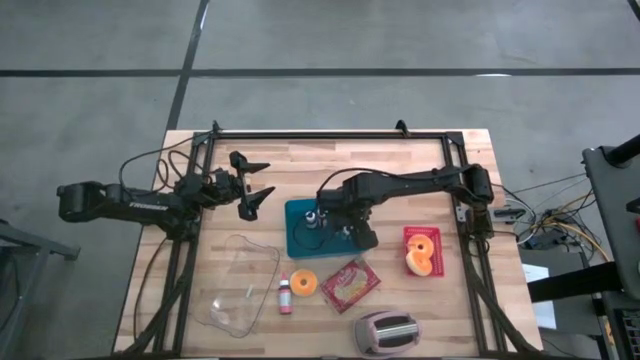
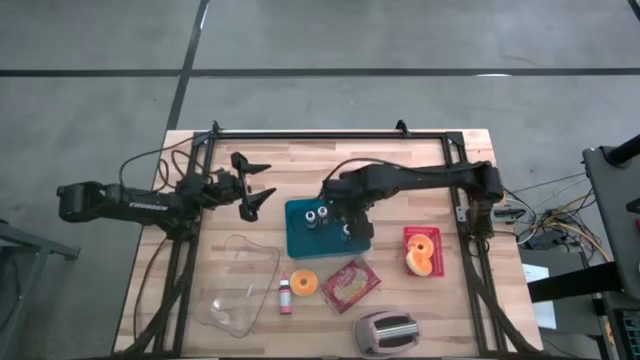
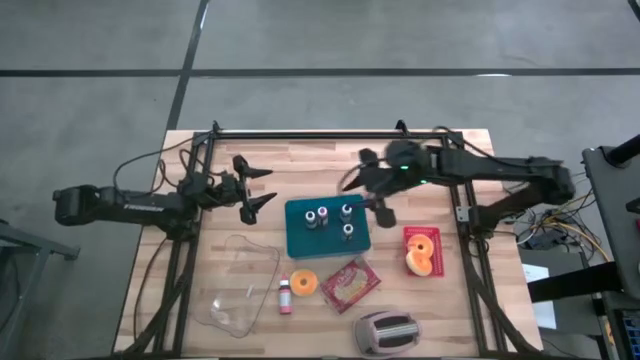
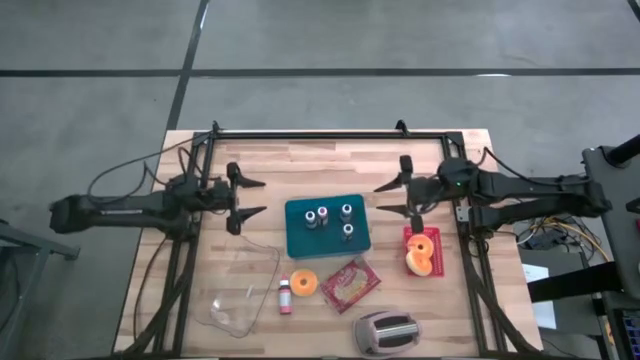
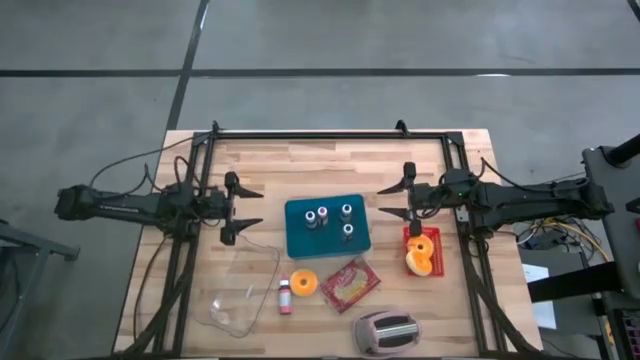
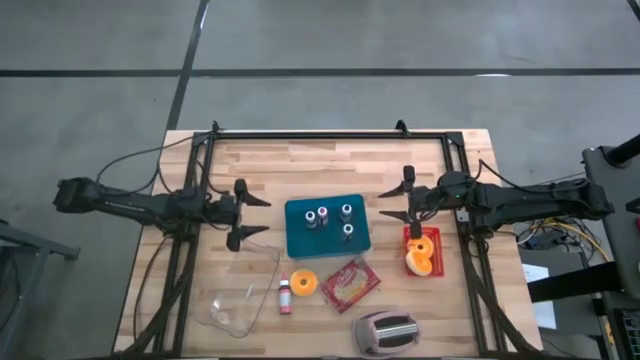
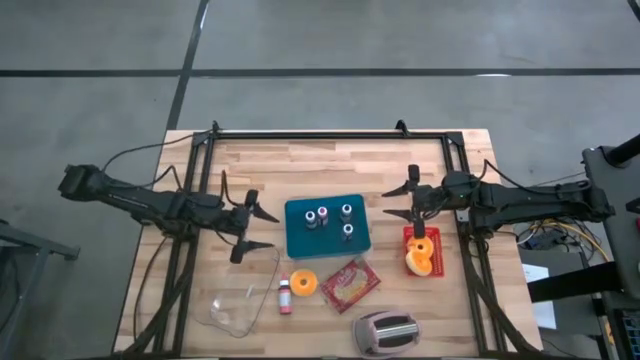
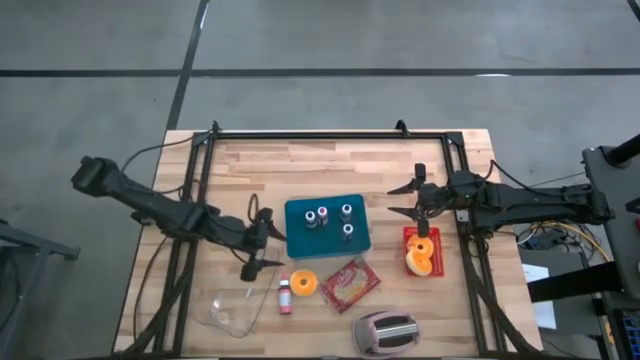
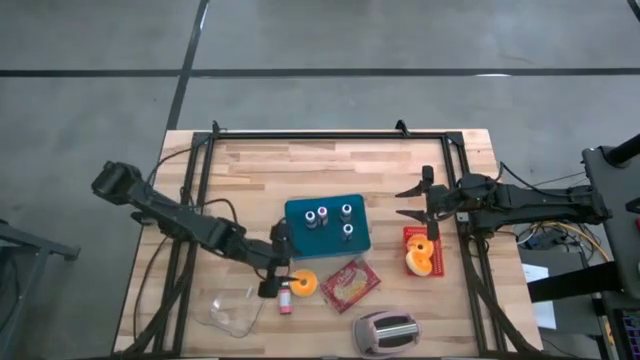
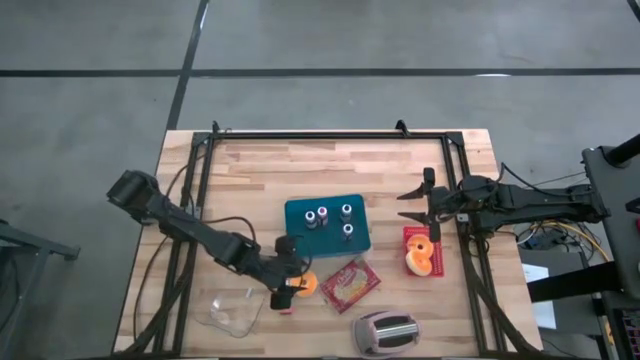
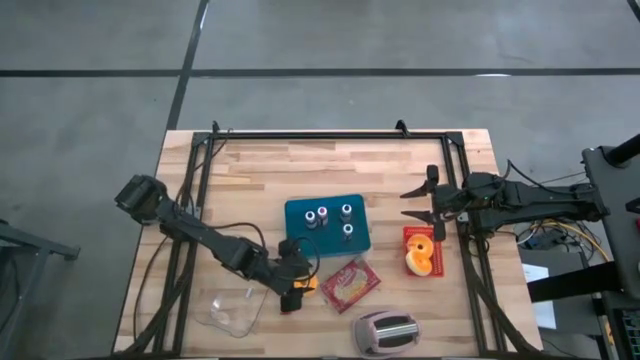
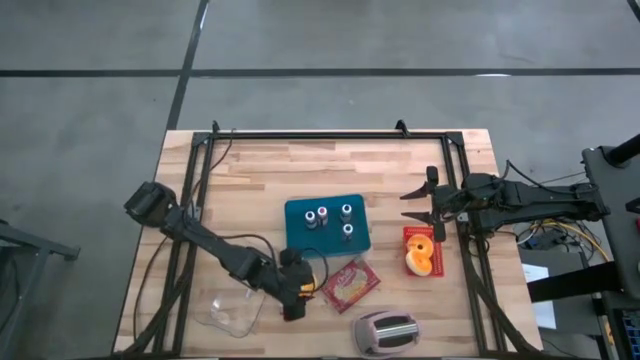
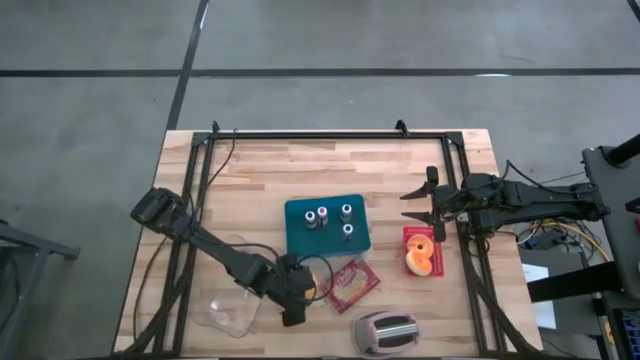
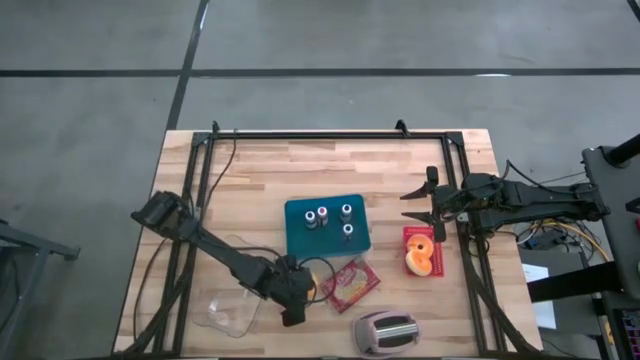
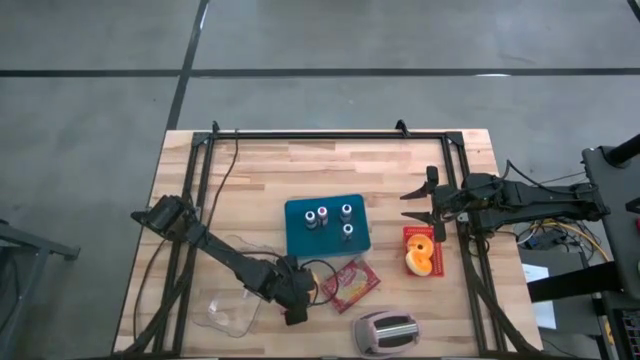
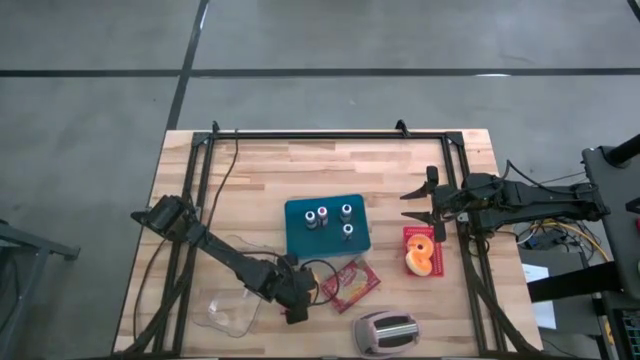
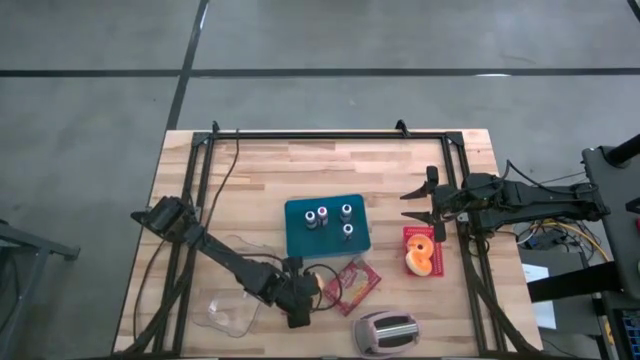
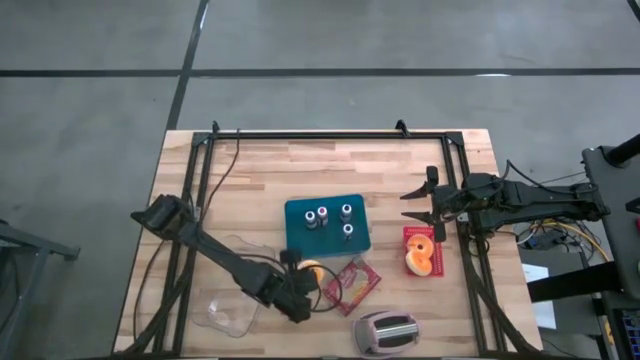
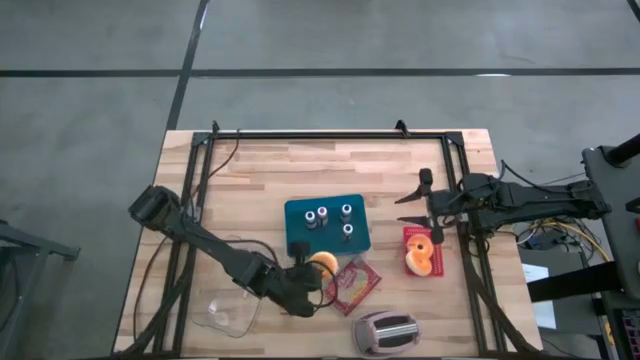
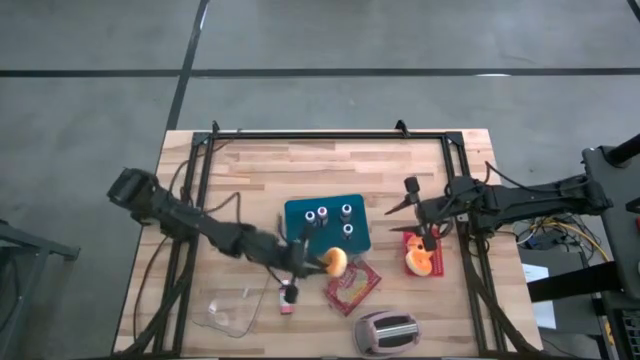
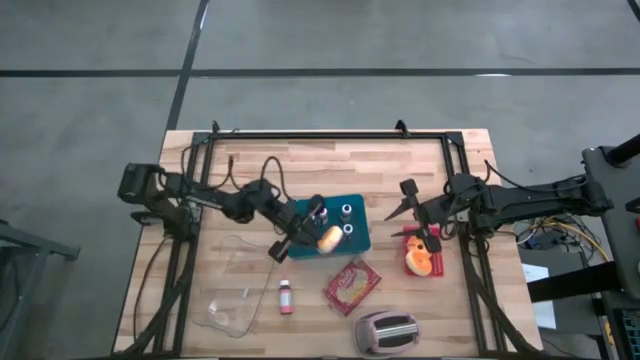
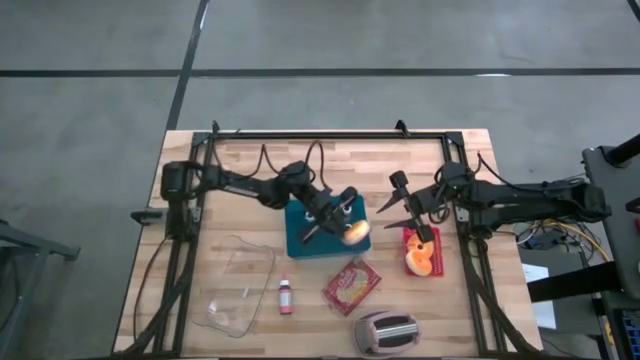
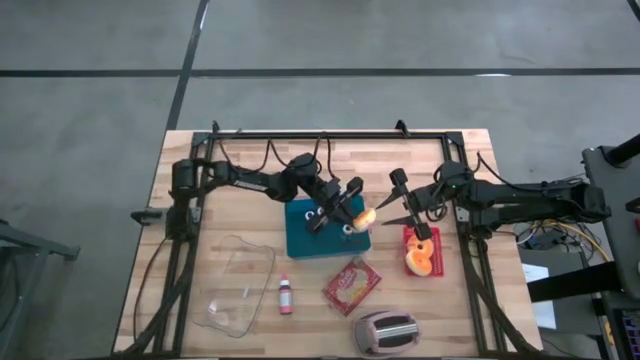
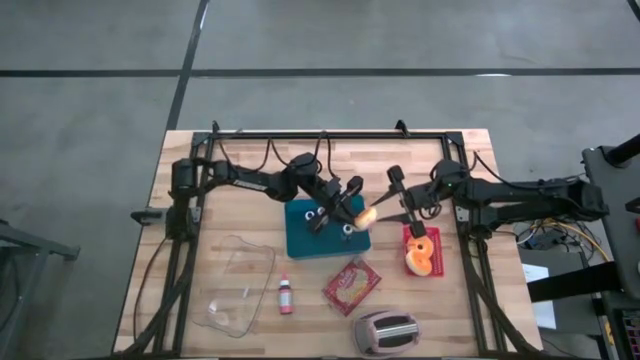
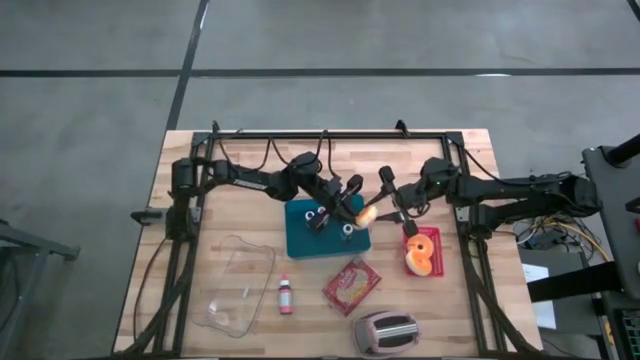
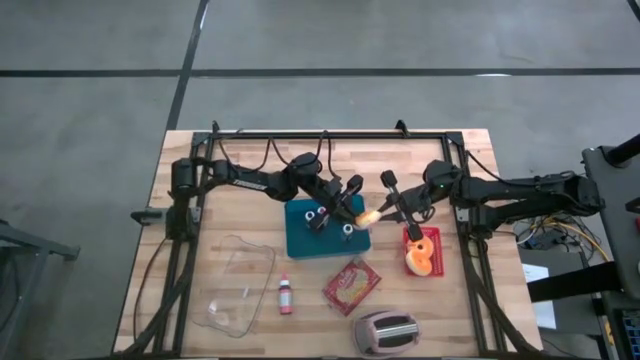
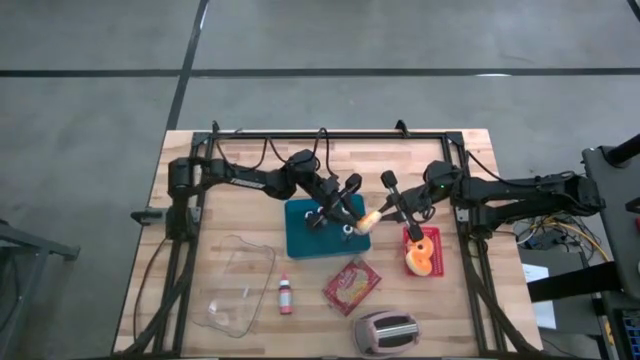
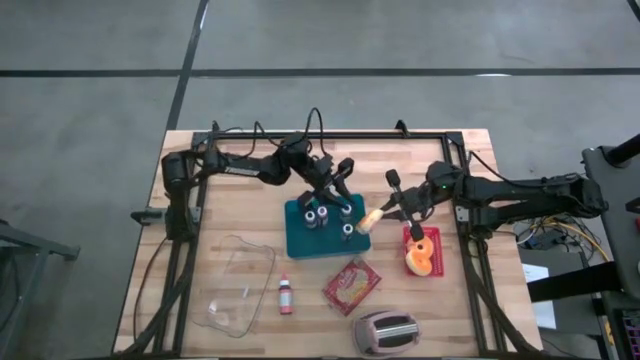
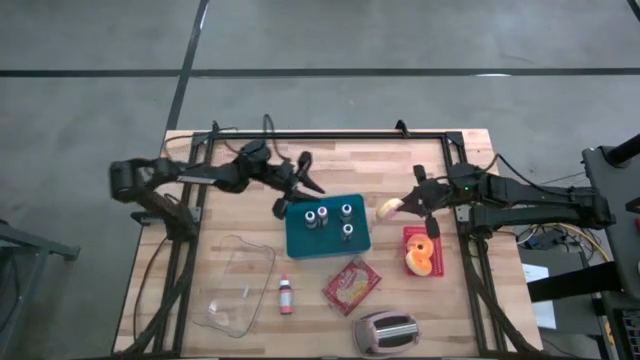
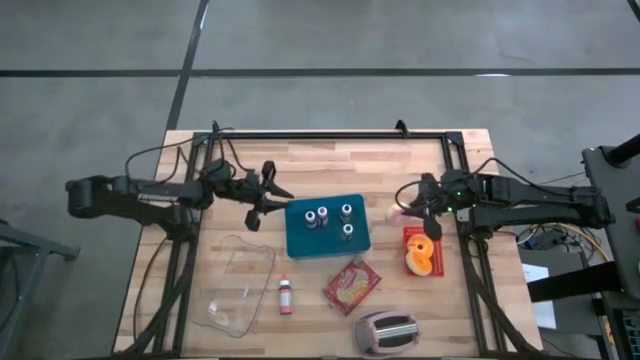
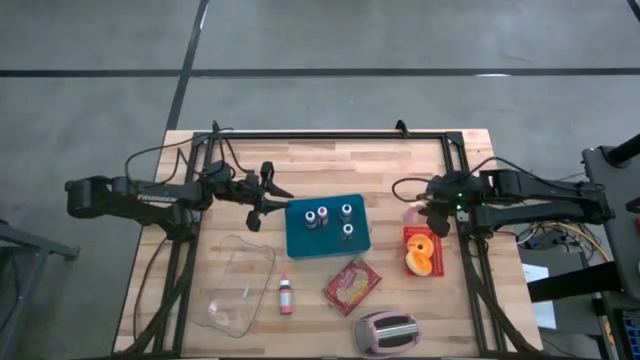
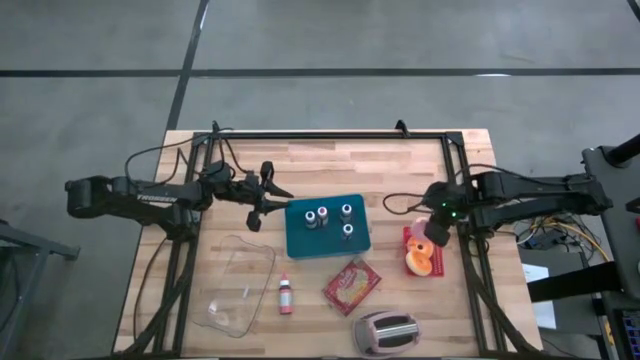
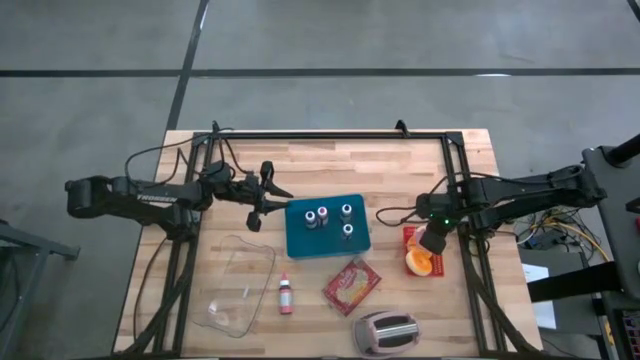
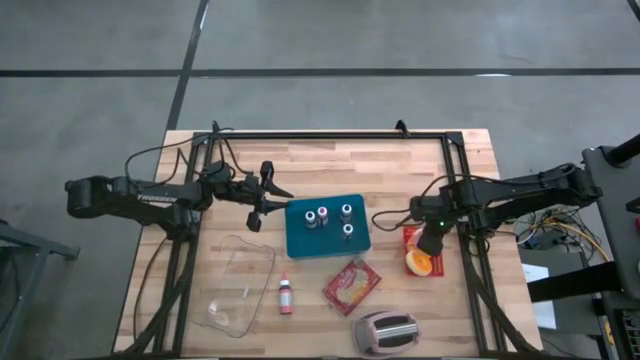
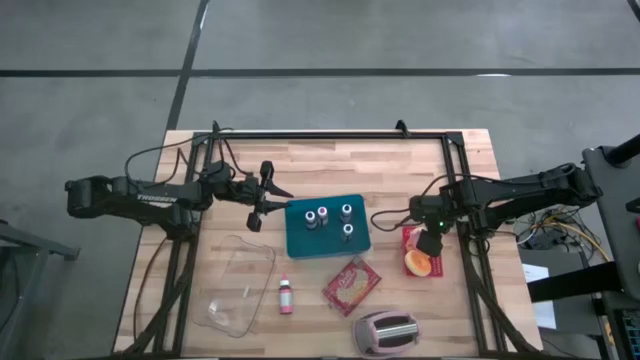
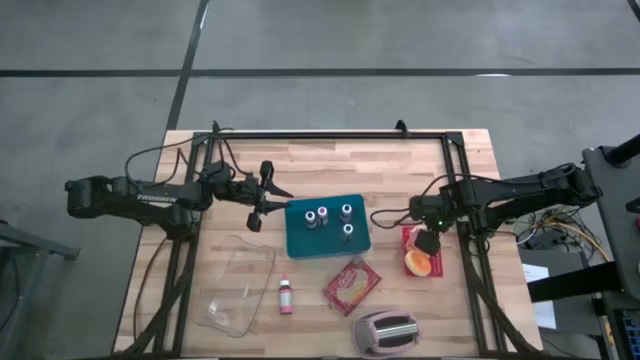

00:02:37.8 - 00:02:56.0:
Task: Pick & Place Food Item
Put the pink donut into the red bin

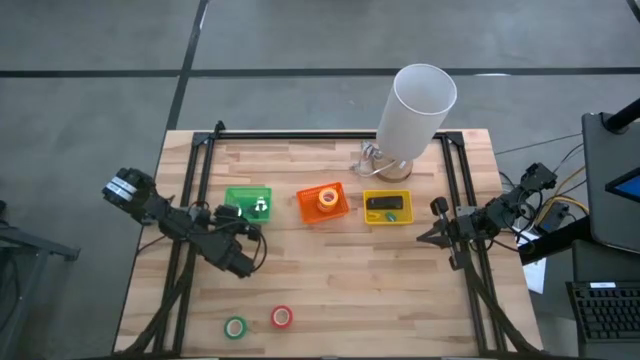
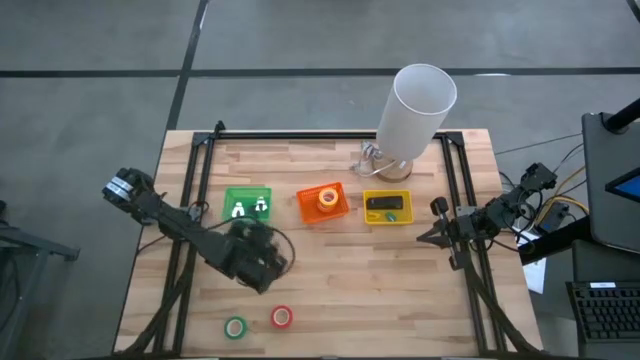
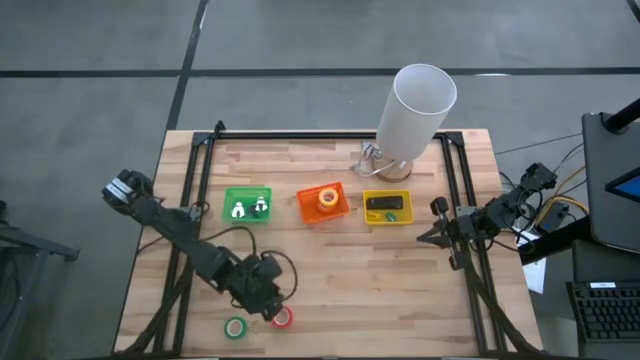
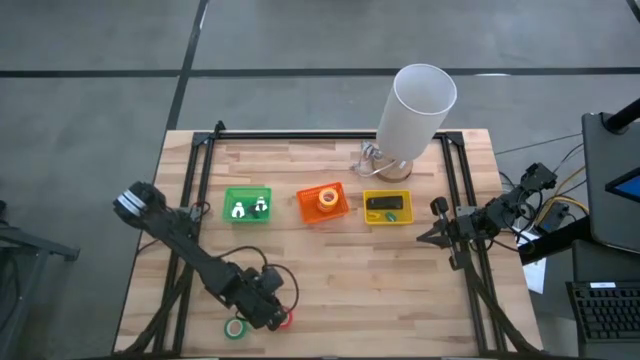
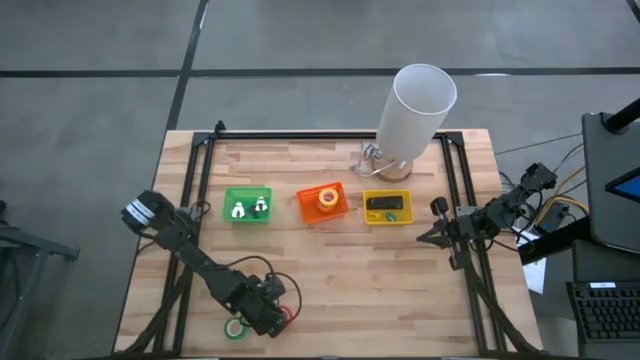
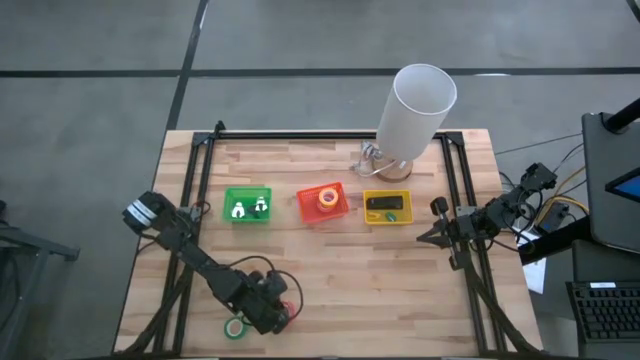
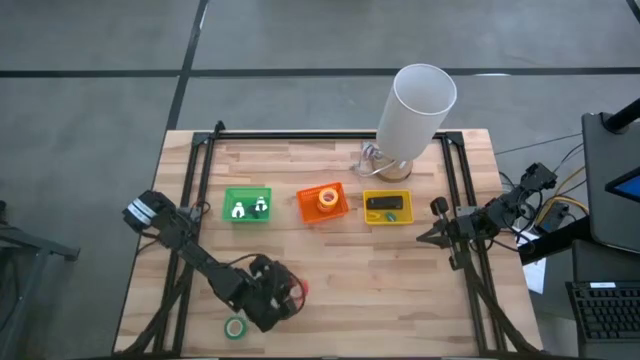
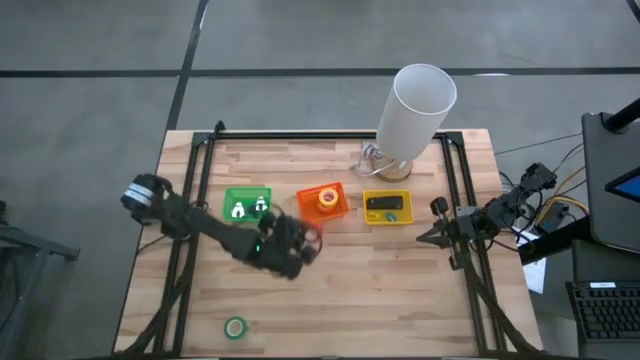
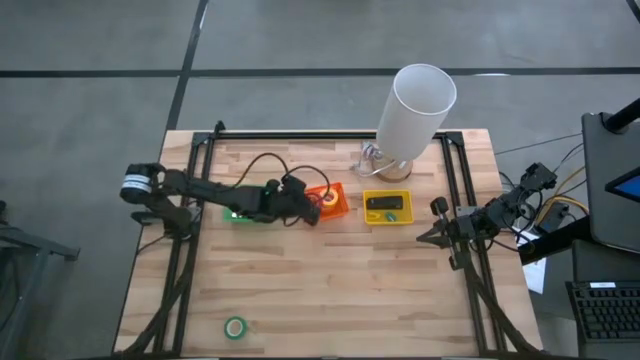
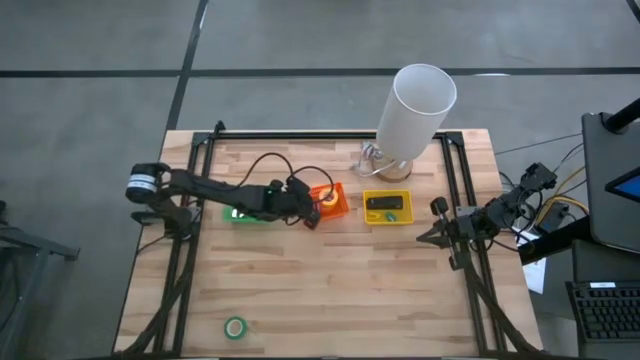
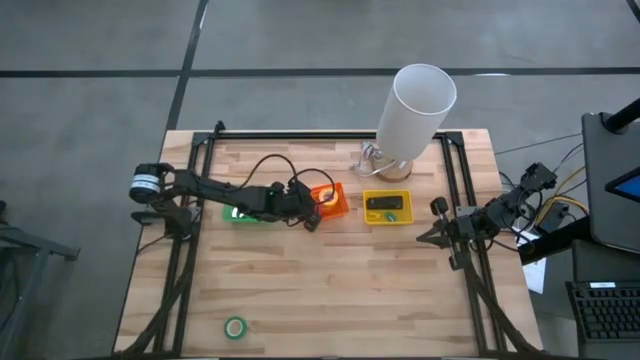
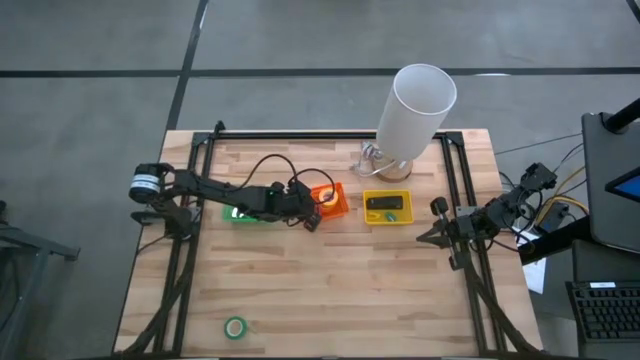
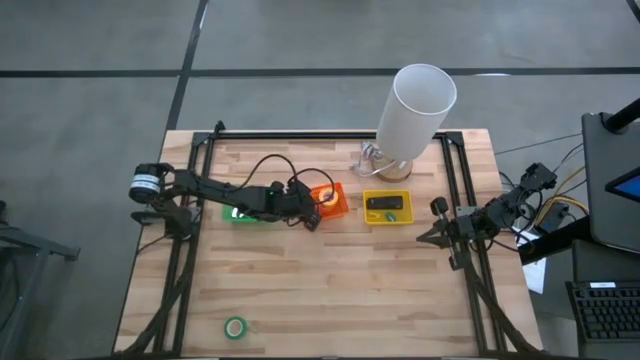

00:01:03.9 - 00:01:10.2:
Task: Pick and place Stapler, Stapler remover, tape
Put the red tape into the orange basket
